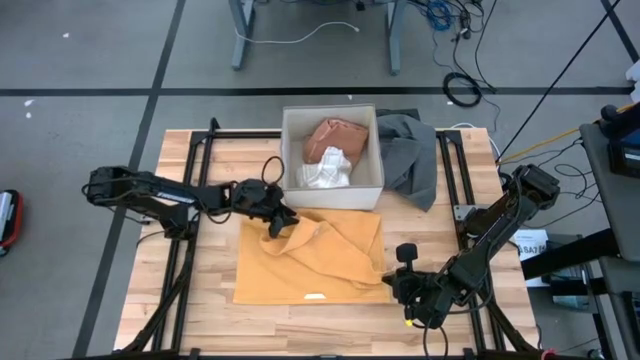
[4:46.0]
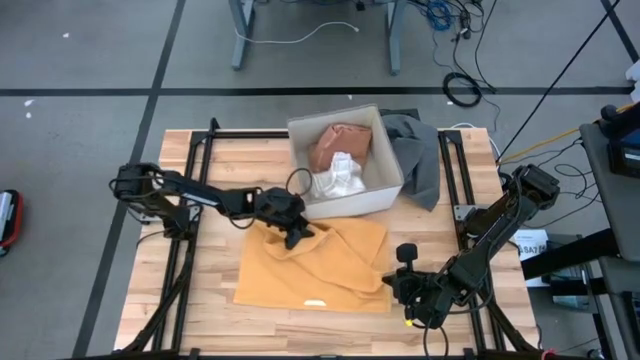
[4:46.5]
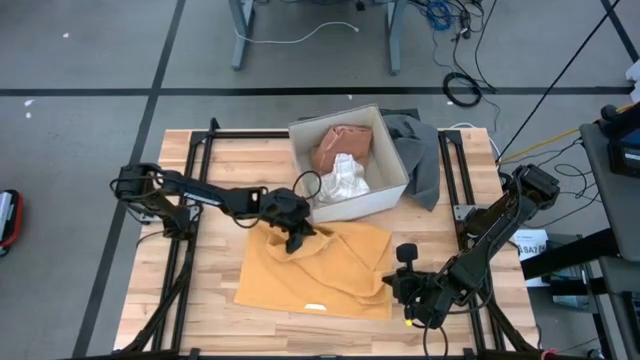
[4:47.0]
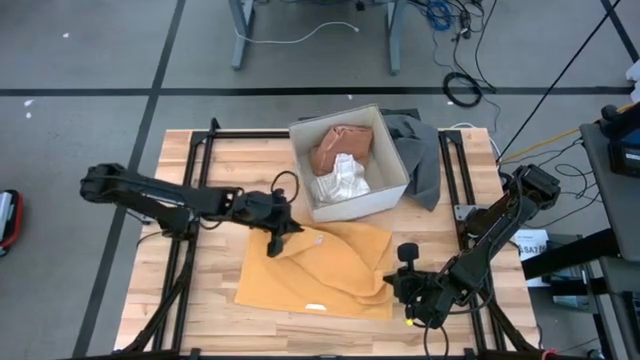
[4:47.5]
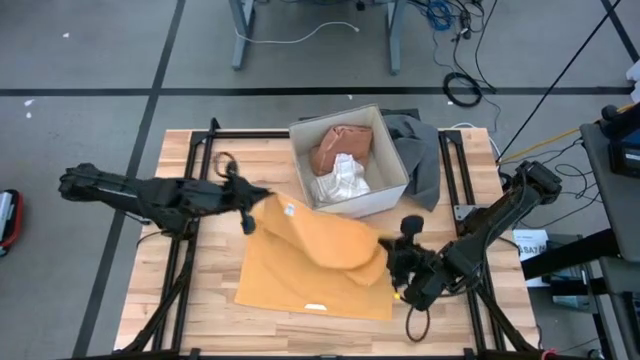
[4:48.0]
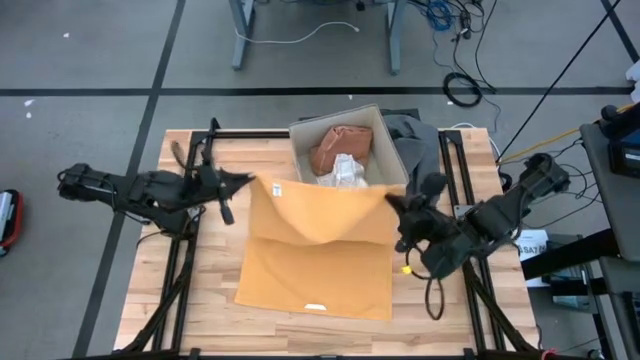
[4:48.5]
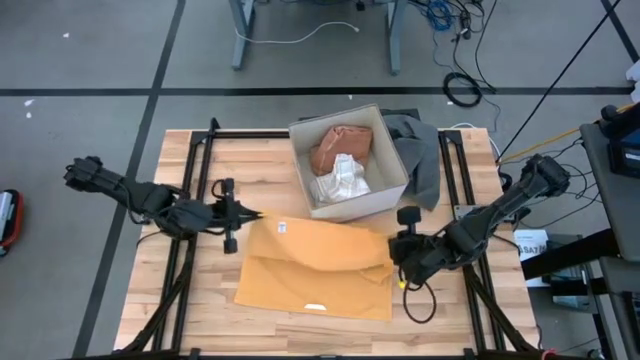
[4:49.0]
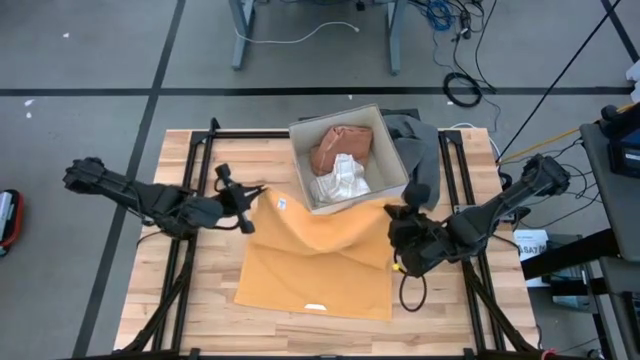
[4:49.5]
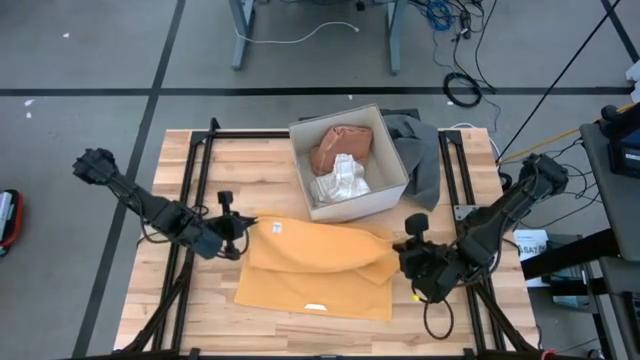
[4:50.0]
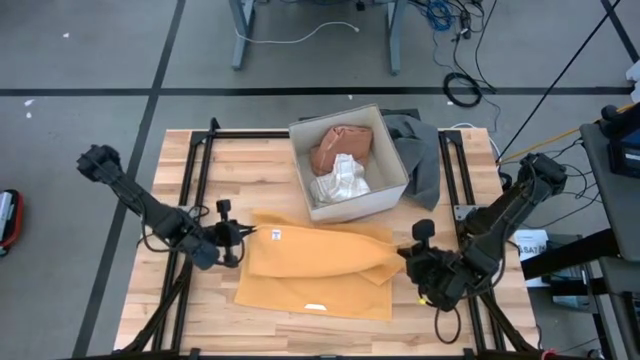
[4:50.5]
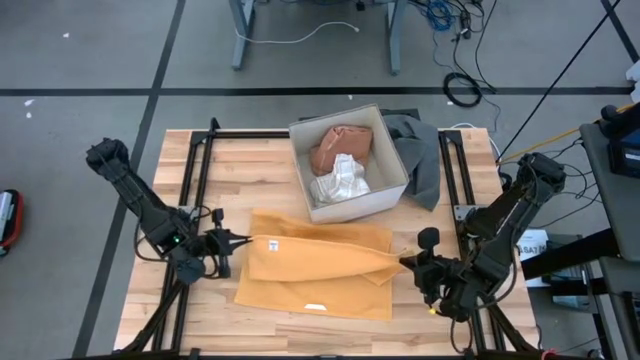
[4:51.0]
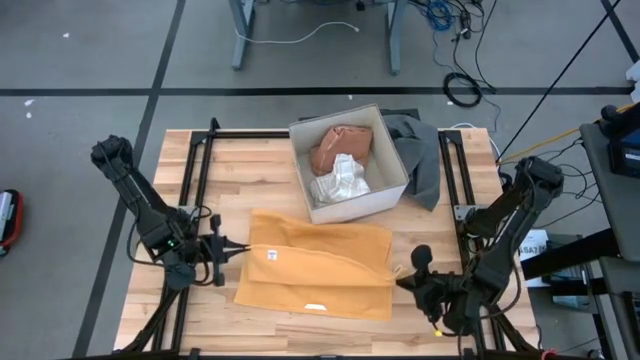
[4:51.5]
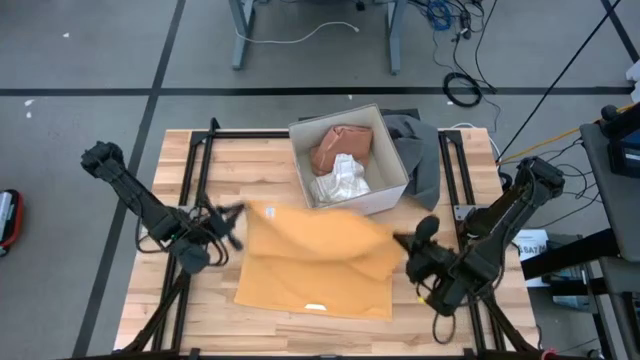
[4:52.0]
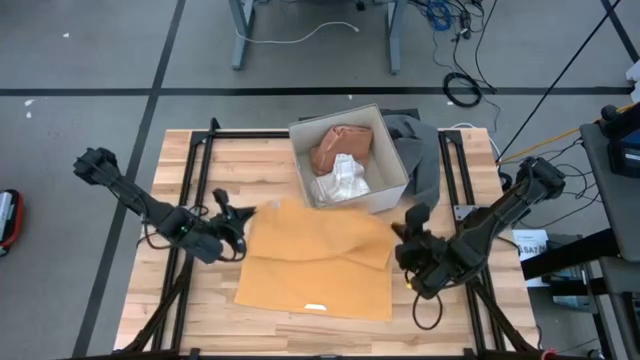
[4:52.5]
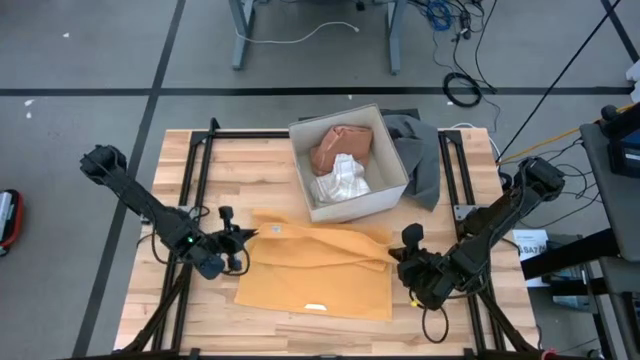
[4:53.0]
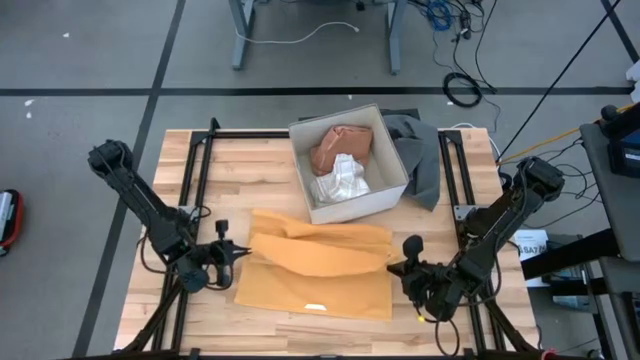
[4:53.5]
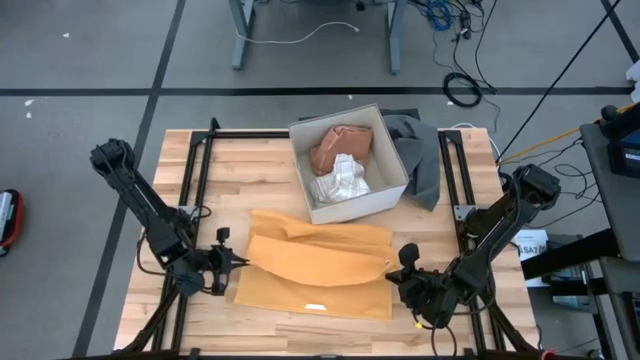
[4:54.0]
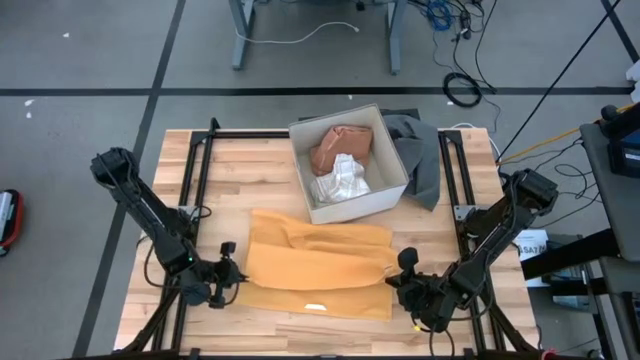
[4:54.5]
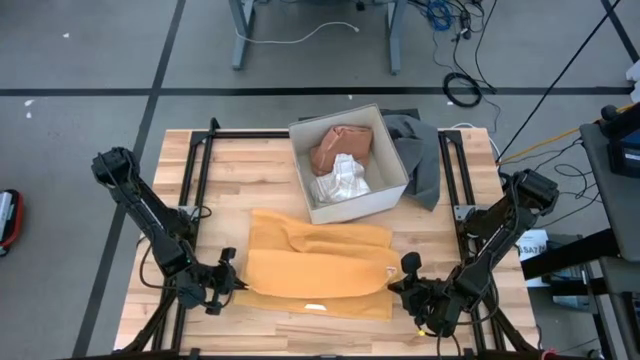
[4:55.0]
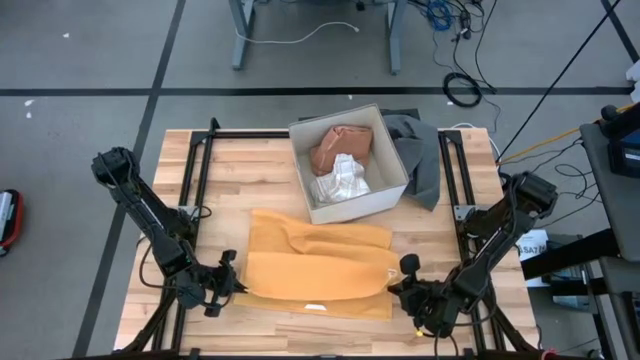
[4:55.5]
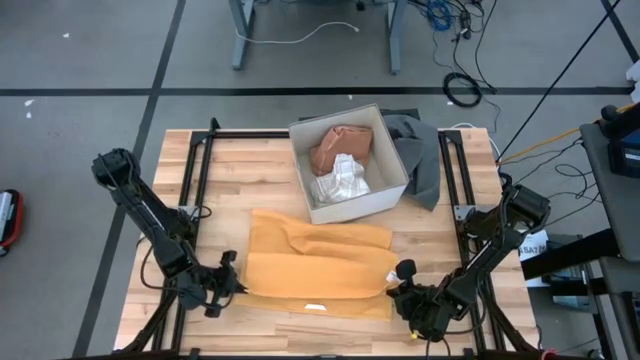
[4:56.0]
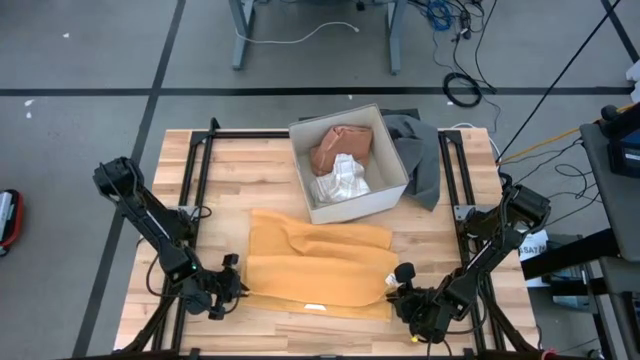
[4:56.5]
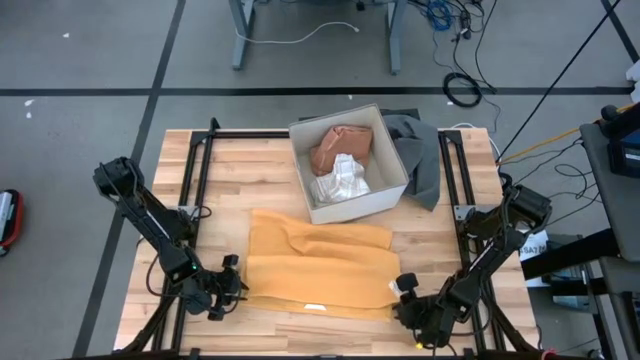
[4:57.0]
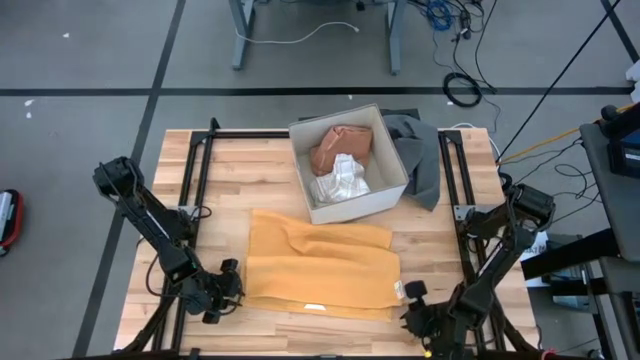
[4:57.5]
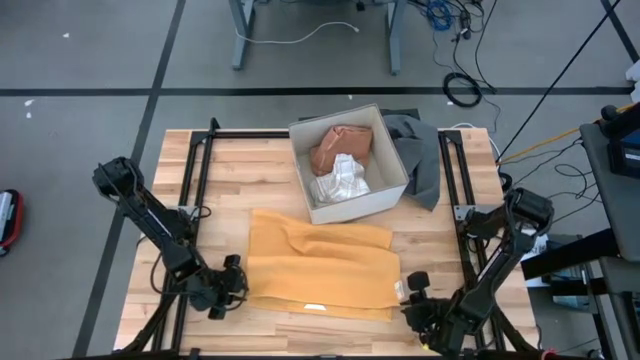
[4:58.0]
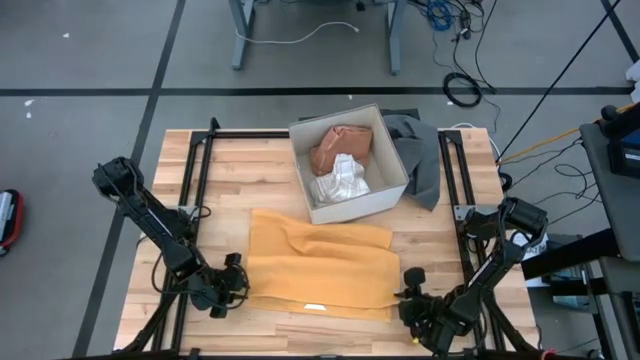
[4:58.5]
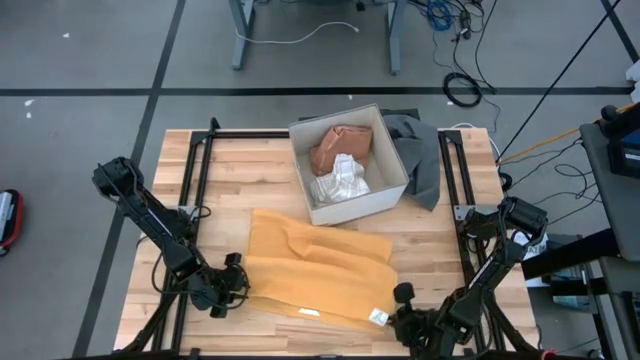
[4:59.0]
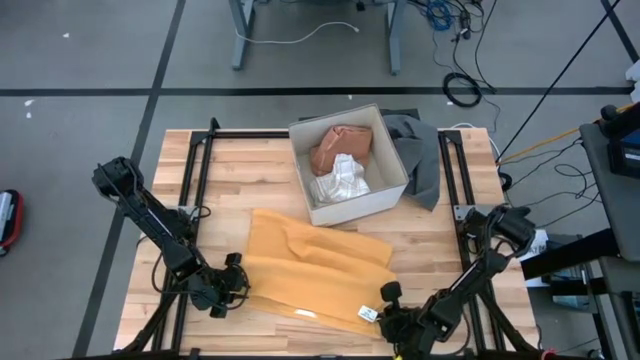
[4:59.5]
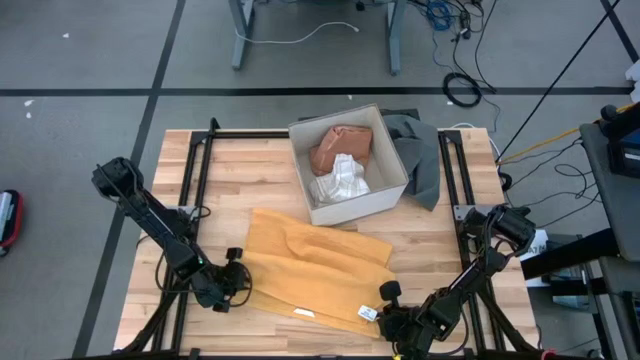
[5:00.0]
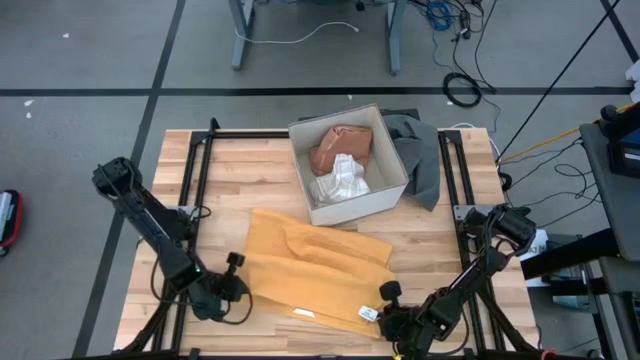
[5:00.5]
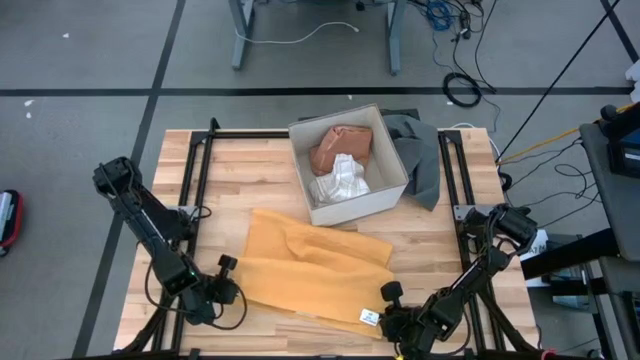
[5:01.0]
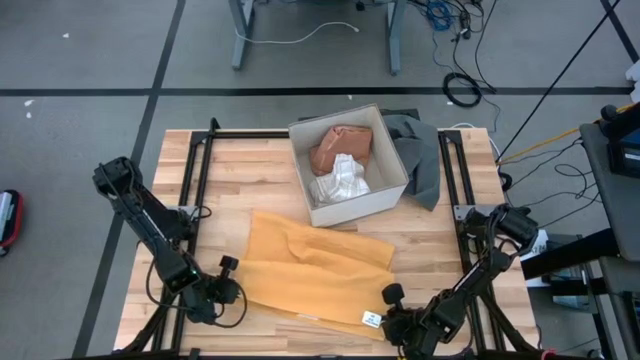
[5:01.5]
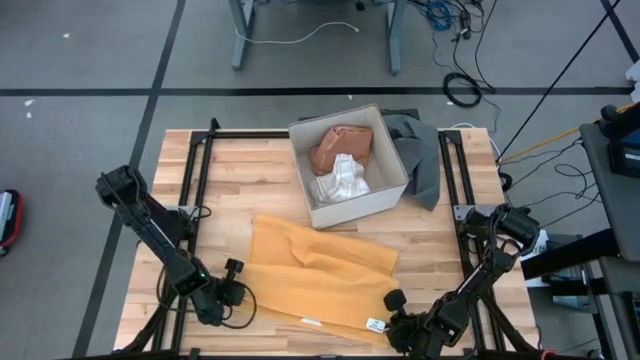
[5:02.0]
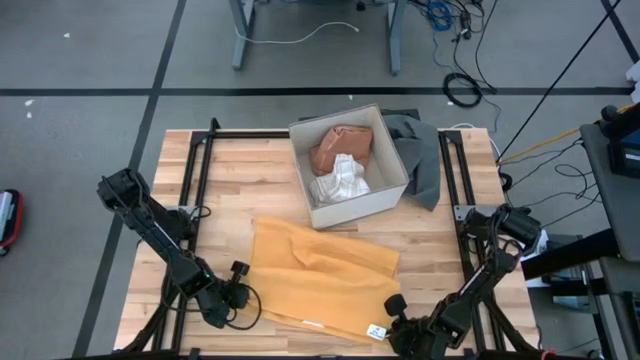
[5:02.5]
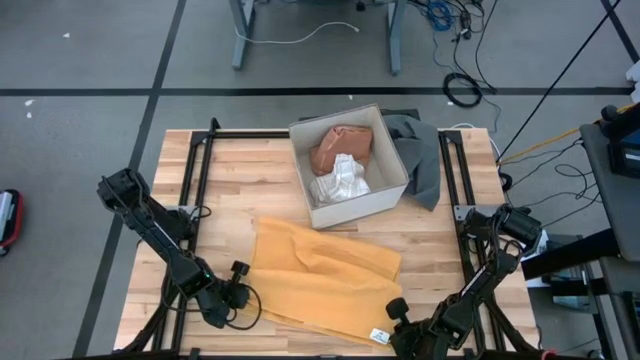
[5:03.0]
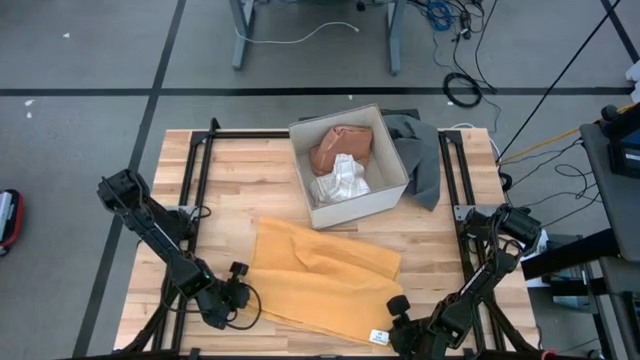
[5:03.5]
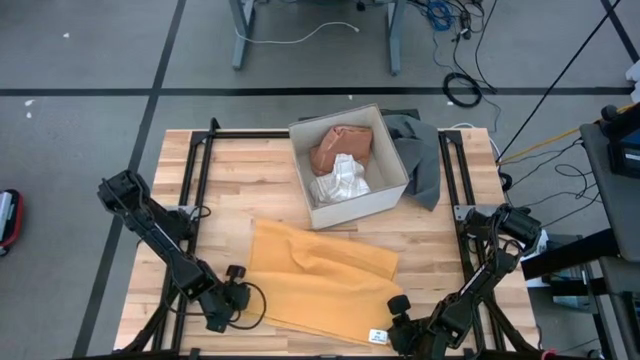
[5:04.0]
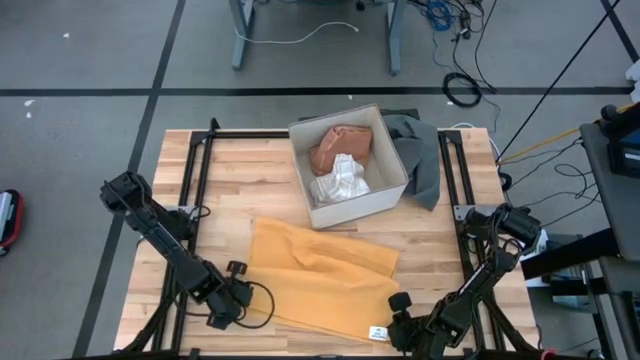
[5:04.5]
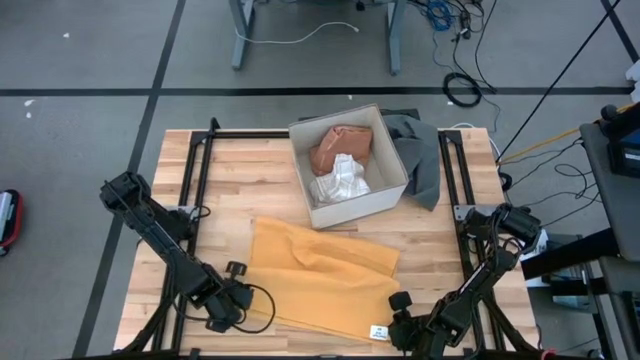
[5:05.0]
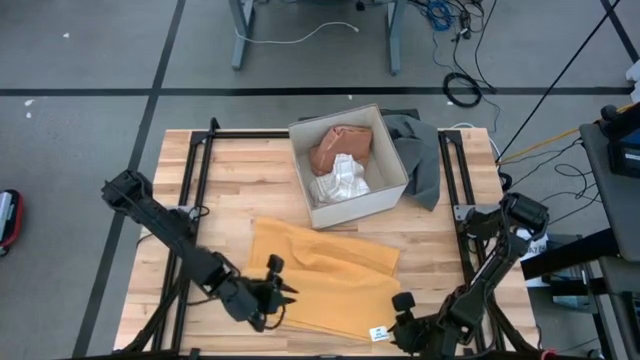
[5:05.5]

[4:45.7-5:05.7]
Task: Fold towel
Fold the orange towel
